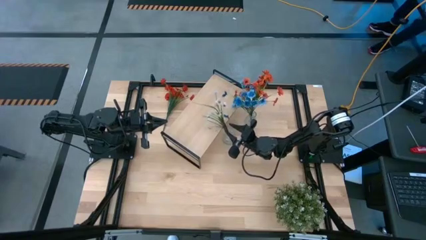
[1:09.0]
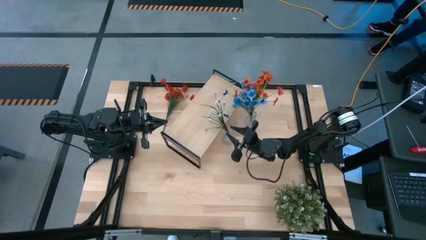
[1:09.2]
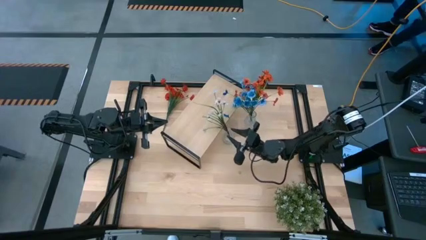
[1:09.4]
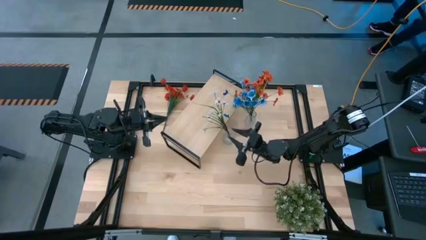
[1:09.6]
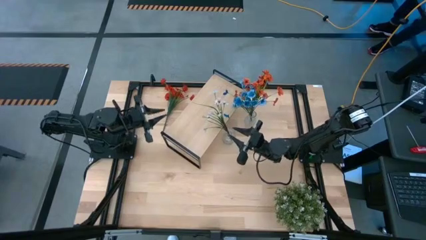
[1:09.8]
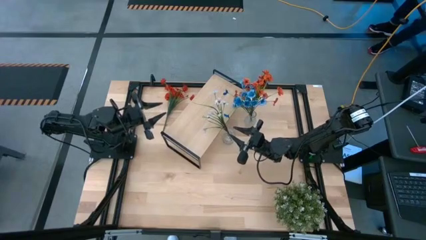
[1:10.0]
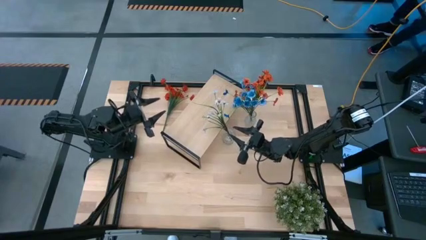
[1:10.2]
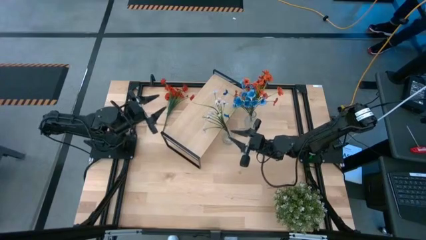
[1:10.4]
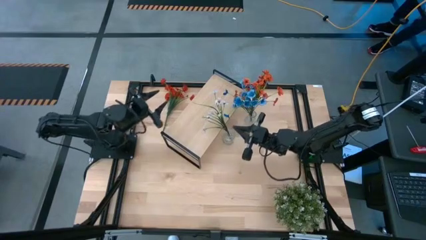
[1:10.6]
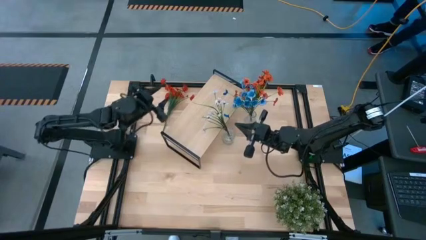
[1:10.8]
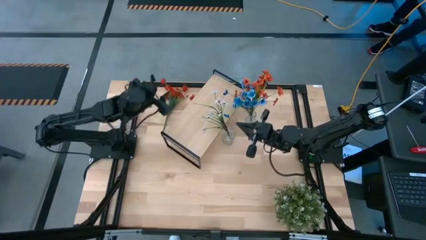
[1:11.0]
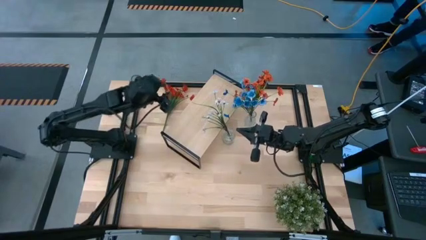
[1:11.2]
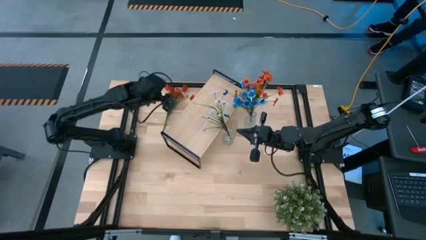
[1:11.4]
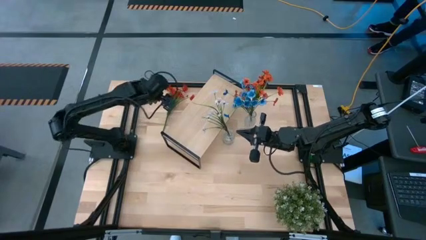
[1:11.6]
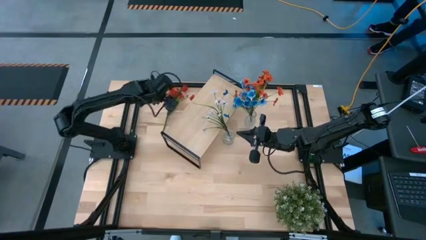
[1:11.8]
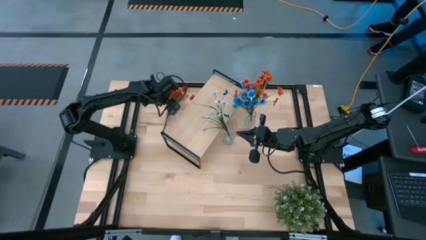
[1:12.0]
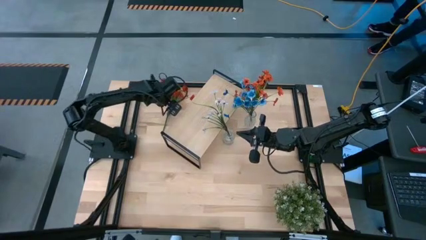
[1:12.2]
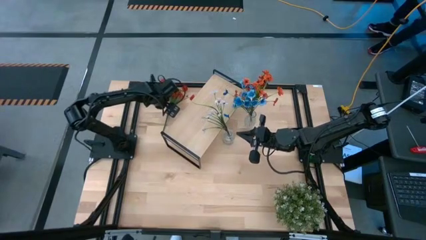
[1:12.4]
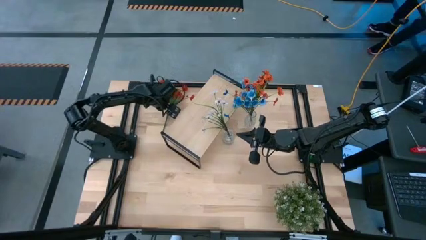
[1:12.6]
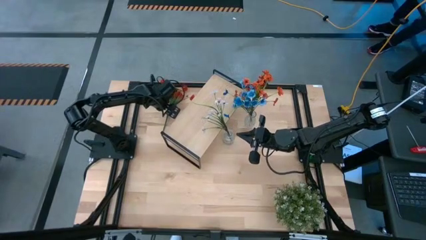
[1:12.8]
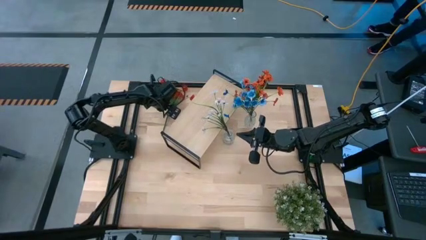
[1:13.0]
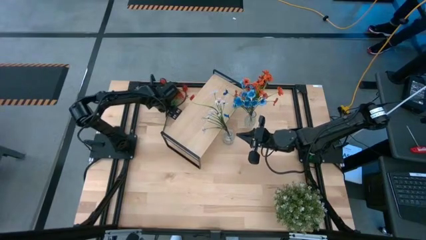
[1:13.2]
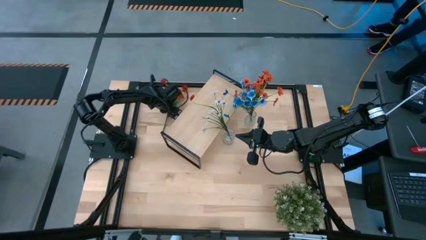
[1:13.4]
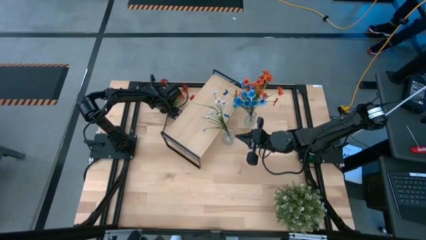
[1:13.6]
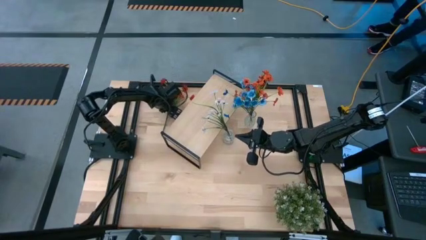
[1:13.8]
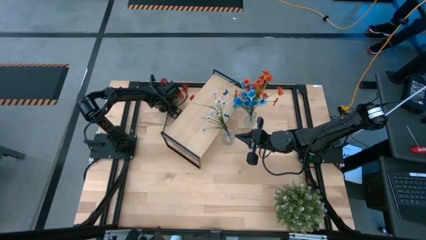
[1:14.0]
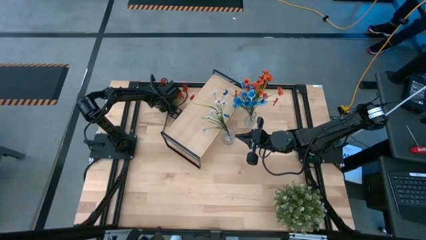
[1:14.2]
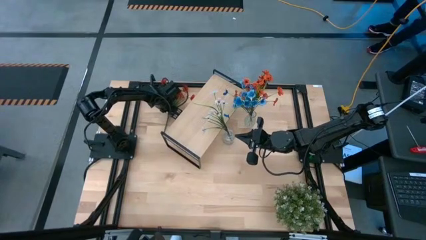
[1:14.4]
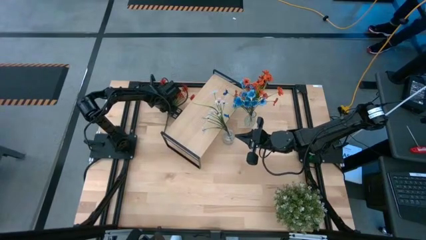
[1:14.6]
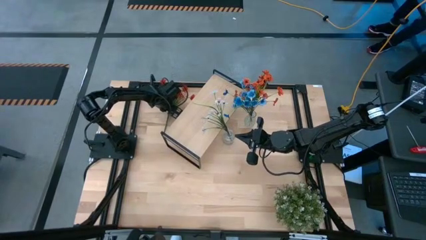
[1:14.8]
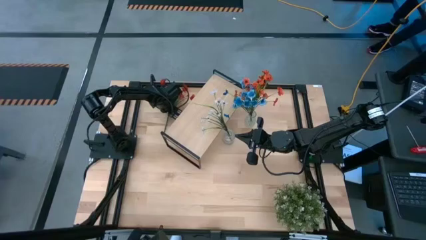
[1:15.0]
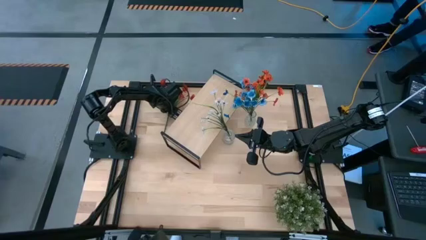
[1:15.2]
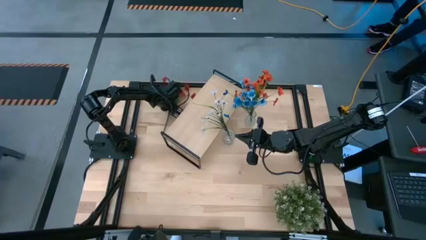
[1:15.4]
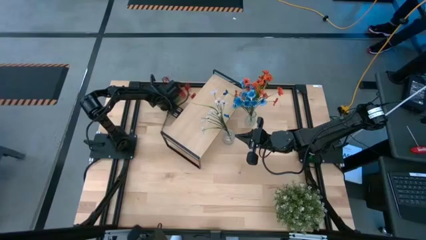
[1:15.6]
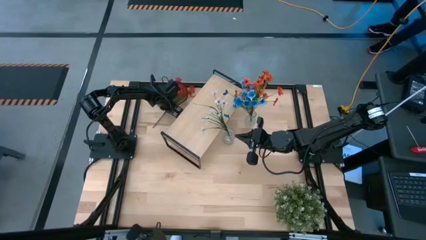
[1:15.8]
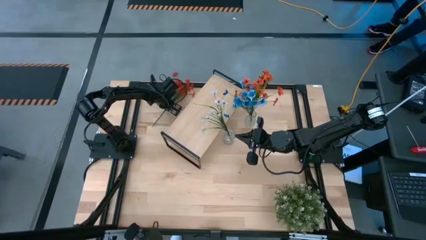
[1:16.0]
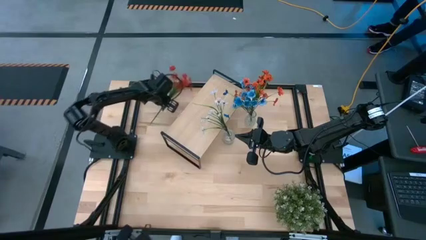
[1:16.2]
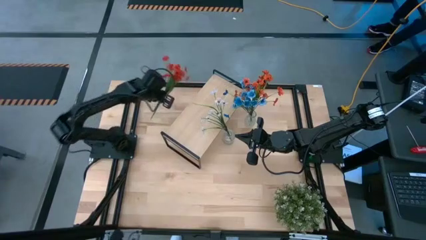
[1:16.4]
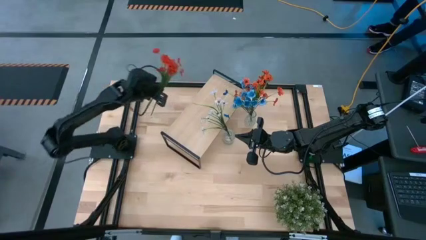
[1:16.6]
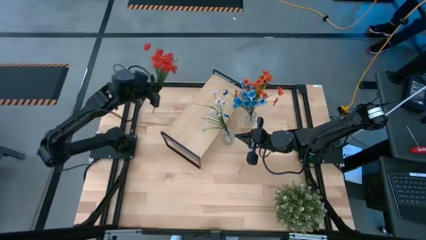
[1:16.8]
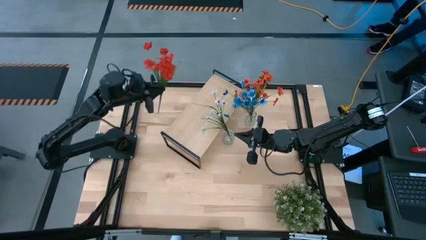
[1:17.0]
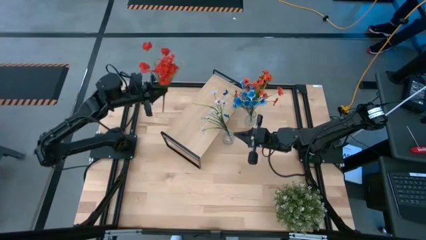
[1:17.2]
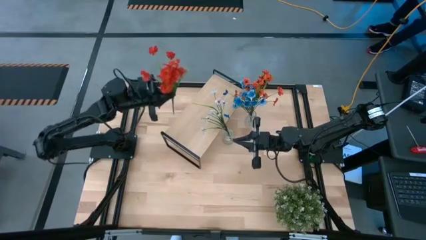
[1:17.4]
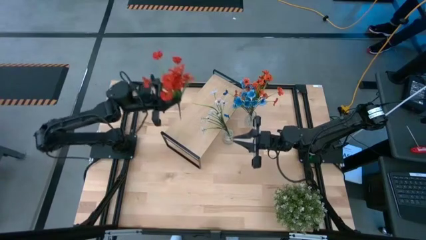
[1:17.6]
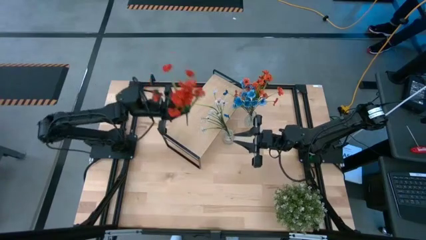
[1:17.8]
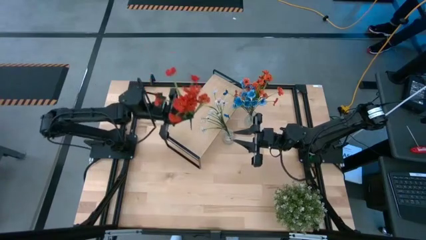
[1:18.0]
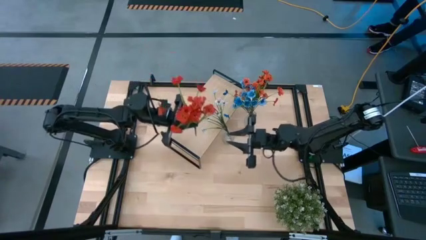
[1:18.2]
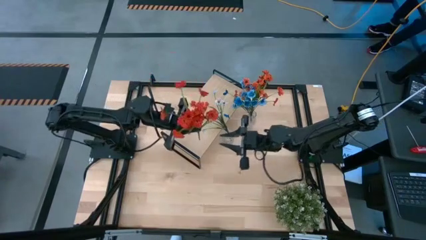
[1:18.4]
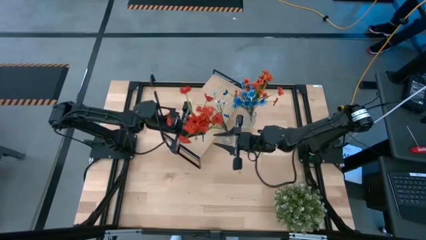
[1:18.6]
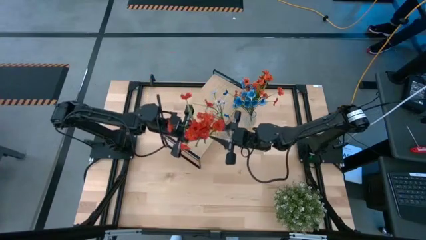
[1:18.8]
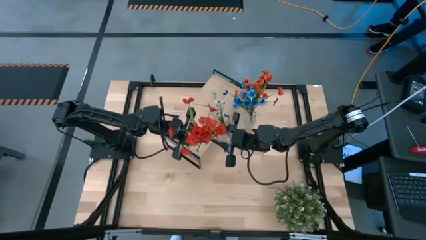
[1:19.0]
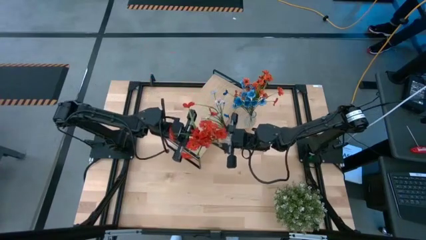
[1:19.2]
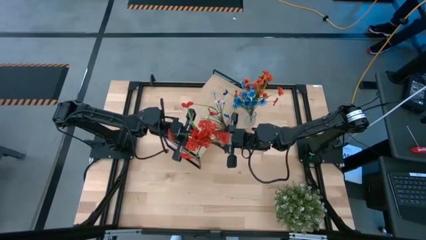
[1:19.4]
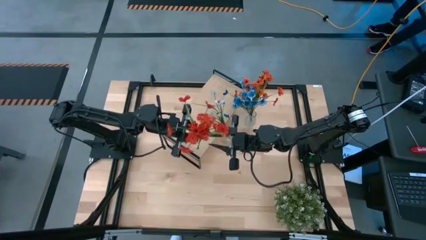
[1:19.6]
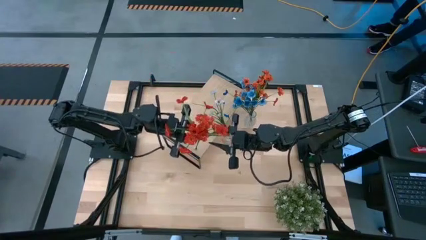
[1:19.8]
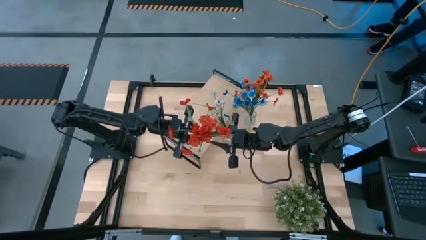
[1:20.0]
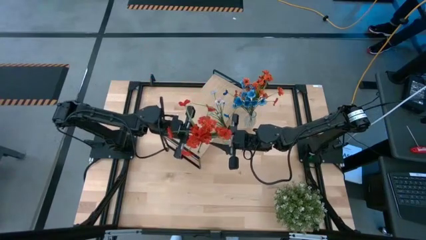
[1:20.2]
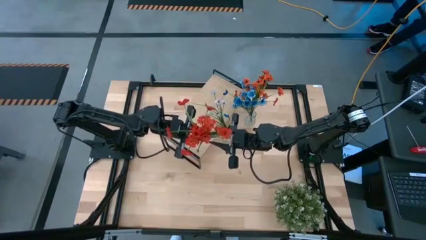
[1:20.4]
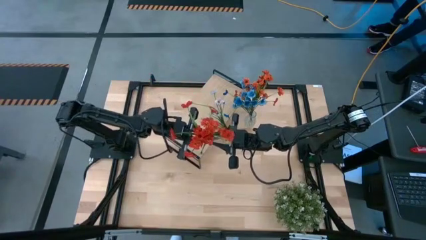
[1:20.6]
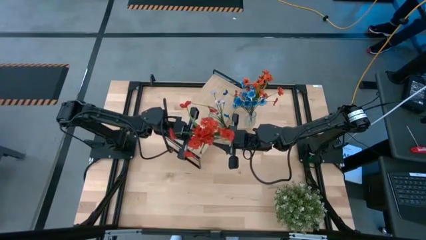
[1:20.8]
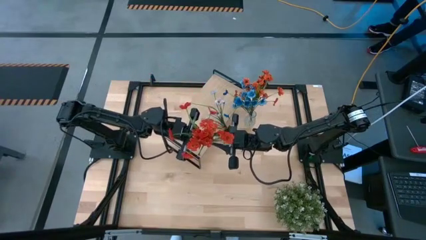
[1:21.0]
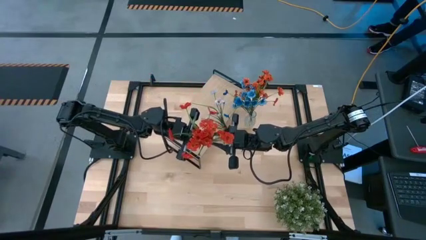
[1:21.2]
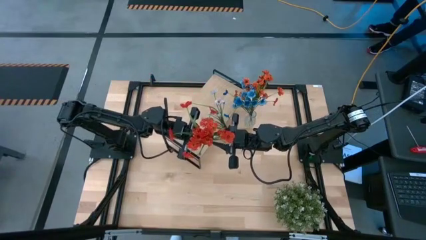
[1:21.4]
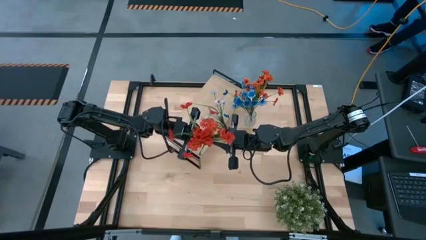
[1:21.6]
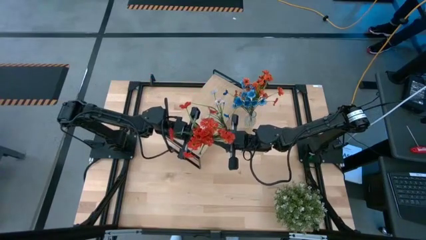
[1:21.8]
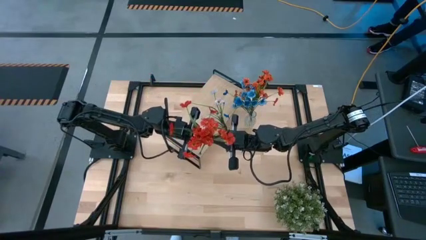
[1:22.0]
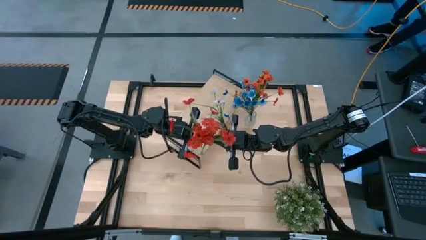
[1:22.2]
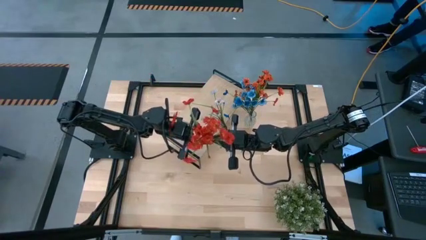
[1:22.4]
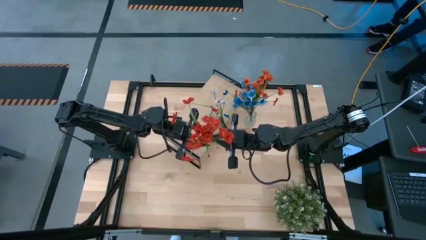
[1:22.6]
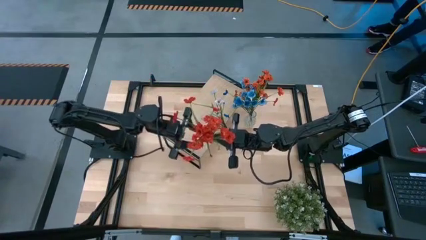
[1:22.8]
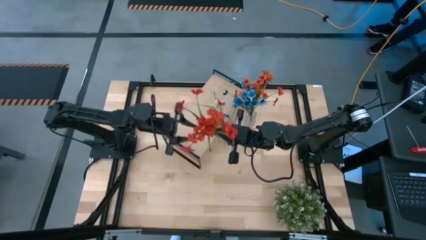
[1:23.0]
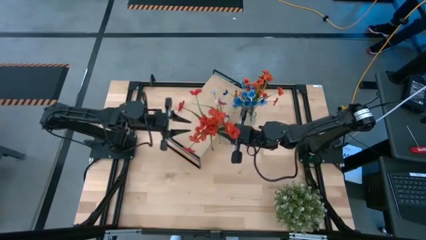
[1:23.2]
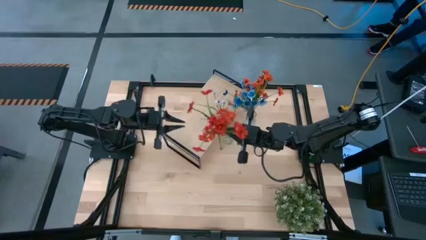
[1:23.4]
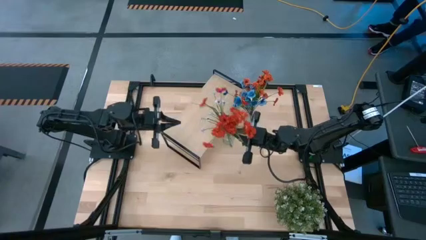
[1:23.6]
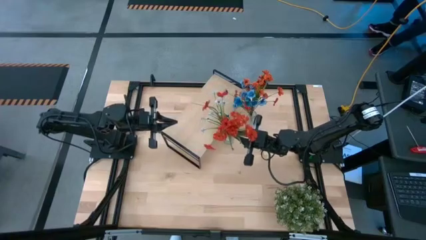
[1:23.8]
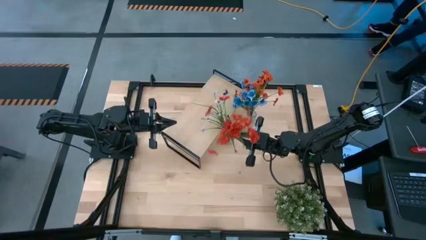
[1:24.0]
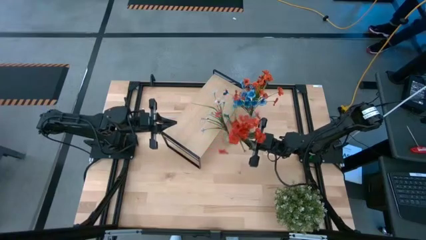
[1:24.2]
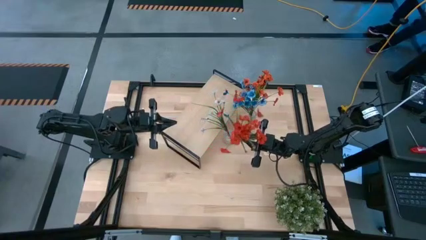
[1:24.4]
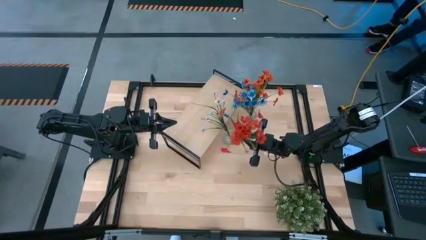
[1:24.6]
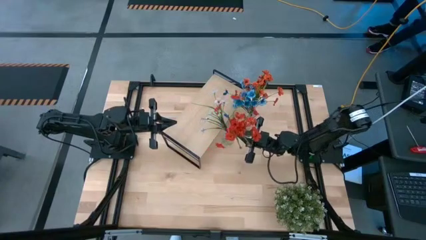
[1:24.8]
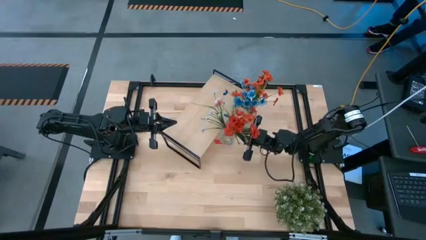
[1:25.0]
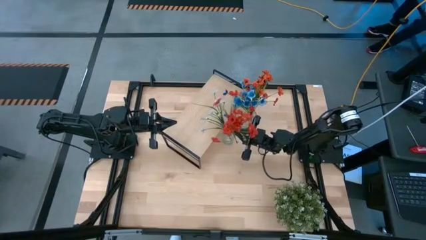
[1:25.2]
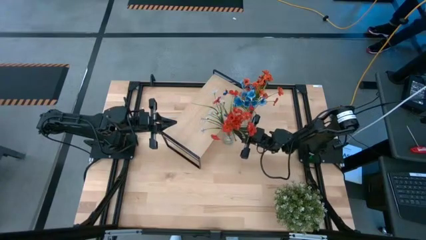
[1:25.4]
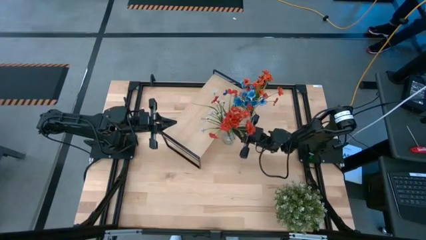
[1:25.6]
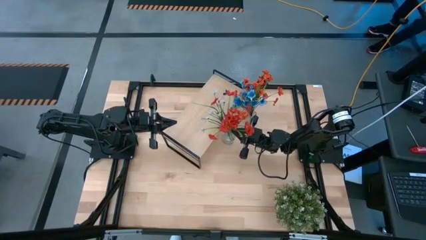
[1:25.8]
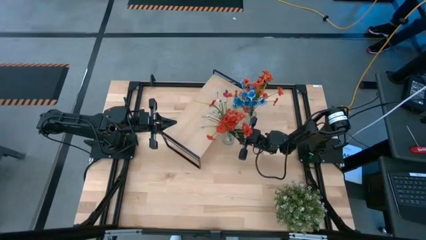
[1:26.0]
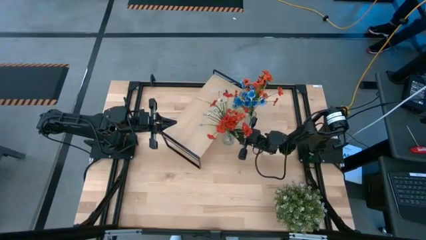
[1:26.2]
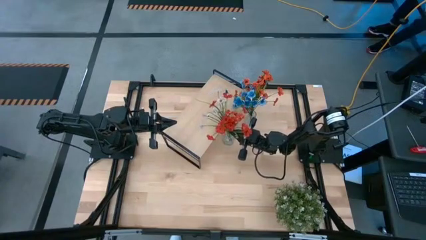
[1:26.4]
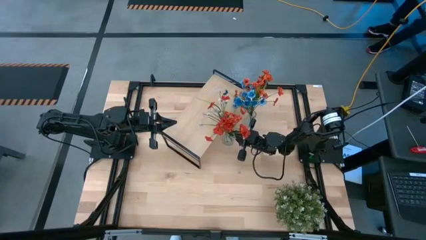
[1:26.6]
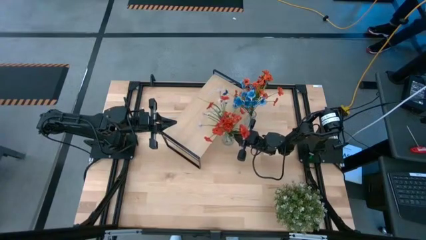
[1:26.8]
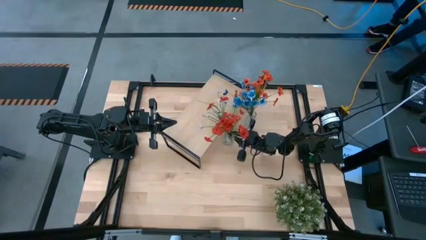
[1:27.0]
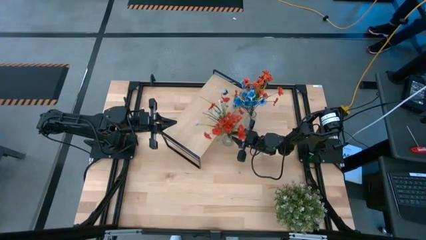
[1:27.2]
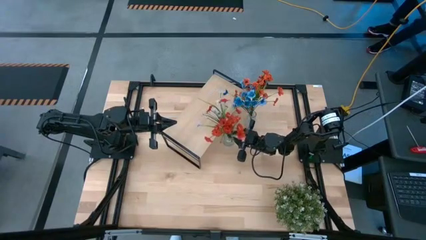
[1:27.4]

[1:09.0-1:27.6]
Task: Pick and place flowers into a vace then onto a shelf
Put the red flowers into the left transparent vase
